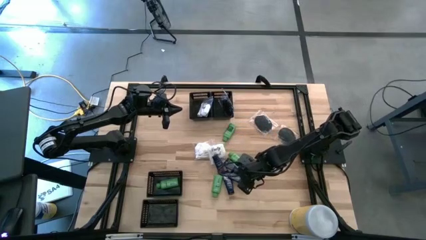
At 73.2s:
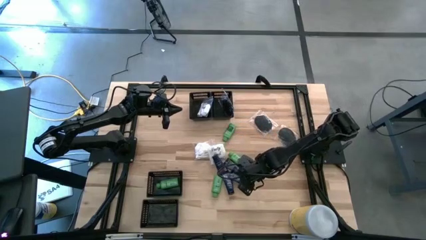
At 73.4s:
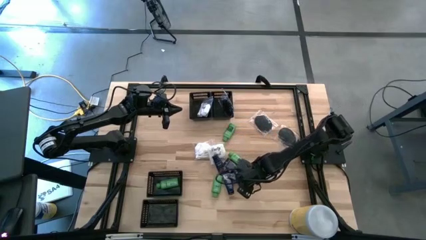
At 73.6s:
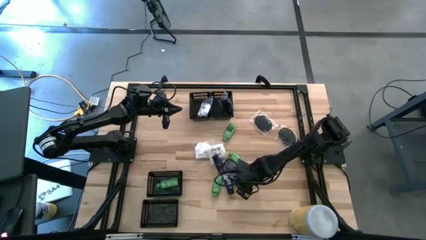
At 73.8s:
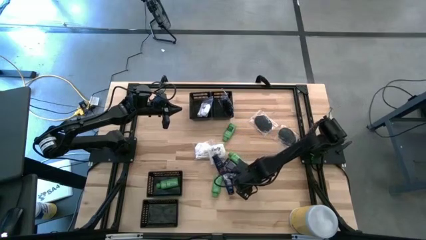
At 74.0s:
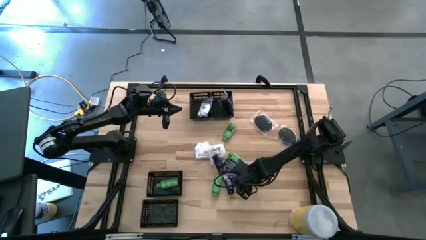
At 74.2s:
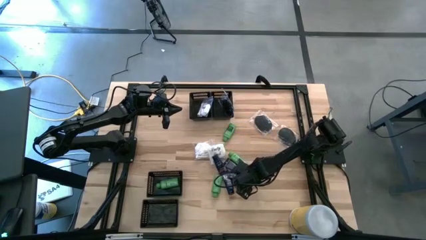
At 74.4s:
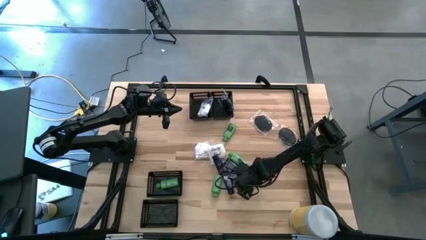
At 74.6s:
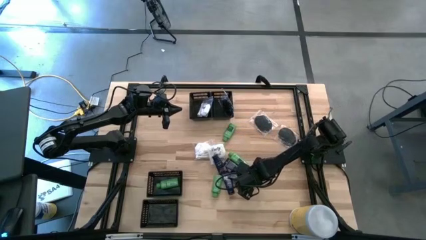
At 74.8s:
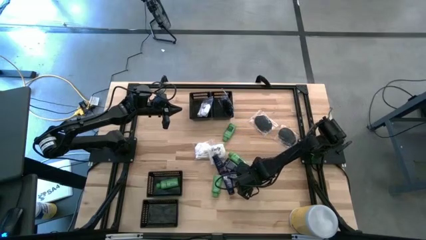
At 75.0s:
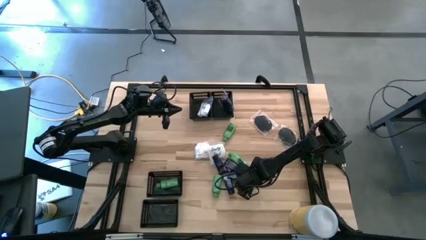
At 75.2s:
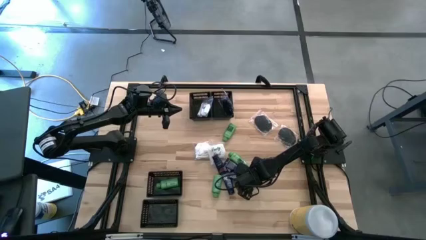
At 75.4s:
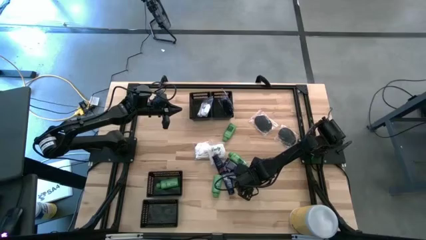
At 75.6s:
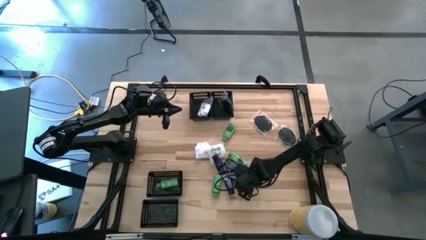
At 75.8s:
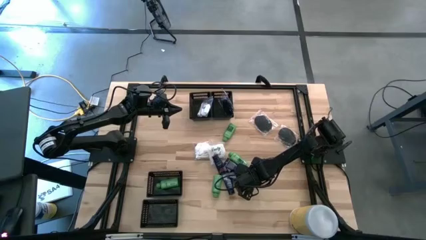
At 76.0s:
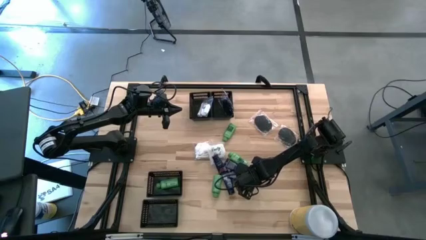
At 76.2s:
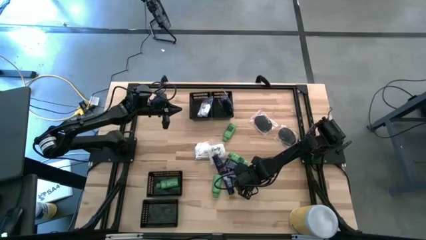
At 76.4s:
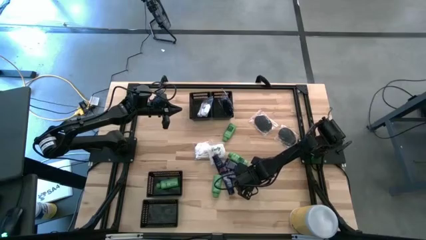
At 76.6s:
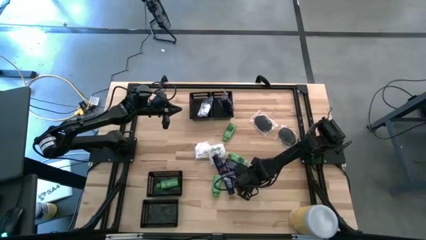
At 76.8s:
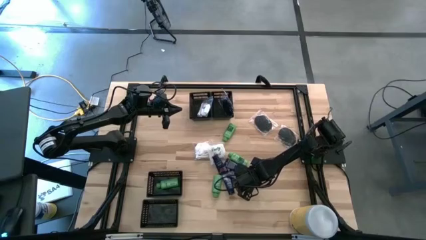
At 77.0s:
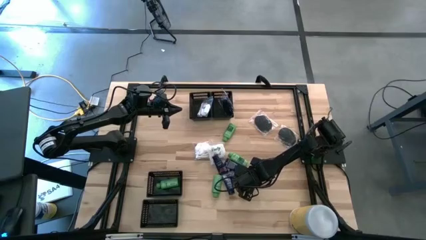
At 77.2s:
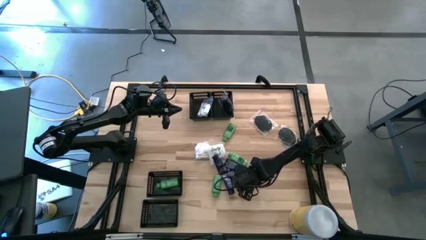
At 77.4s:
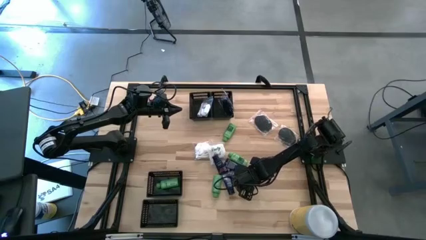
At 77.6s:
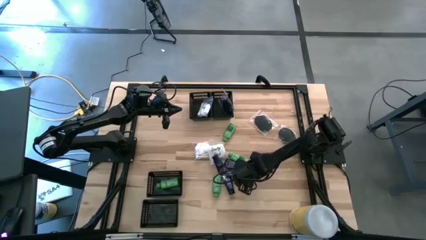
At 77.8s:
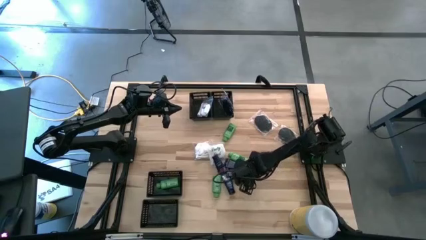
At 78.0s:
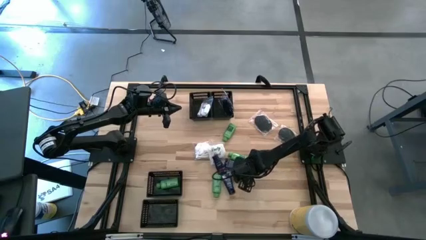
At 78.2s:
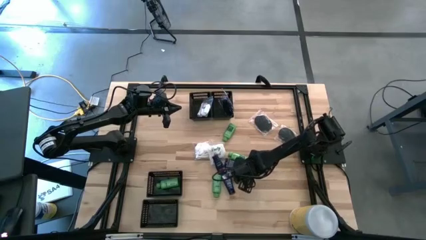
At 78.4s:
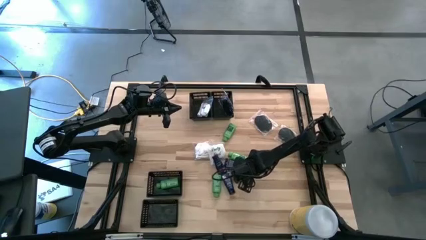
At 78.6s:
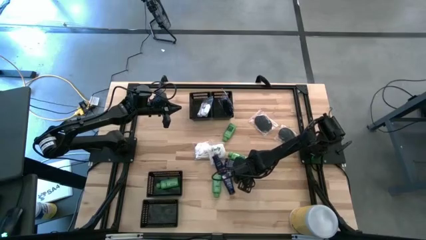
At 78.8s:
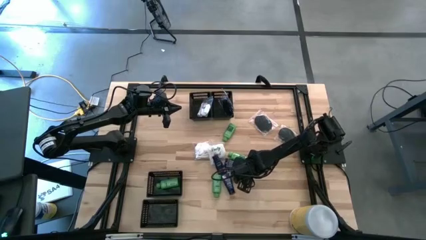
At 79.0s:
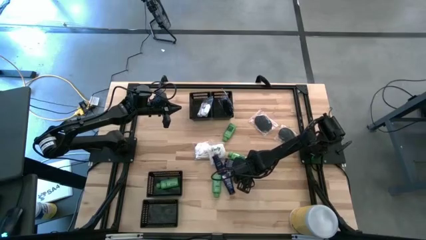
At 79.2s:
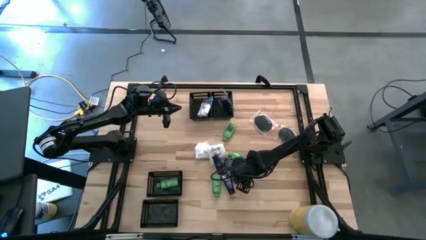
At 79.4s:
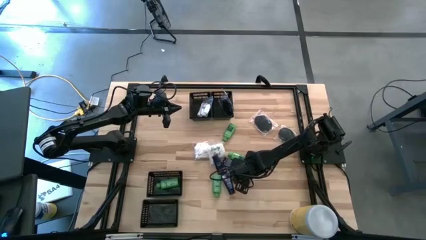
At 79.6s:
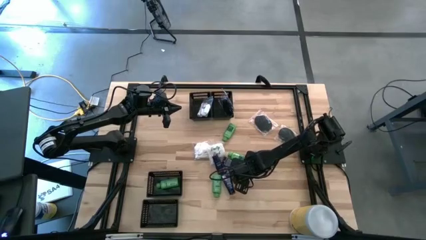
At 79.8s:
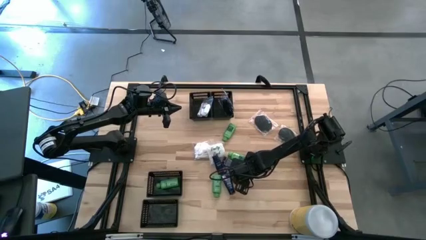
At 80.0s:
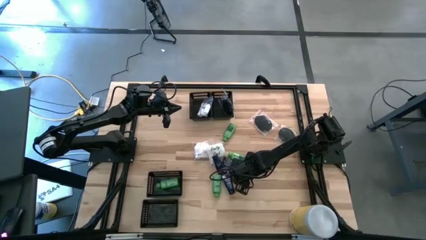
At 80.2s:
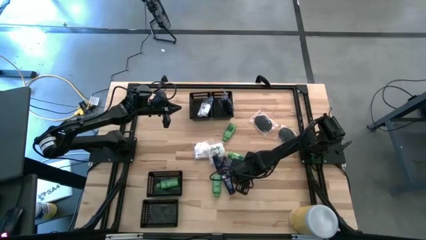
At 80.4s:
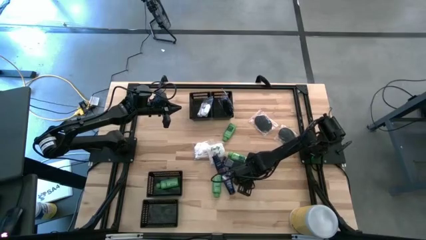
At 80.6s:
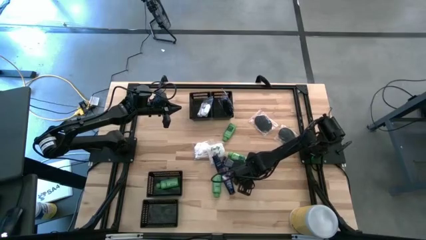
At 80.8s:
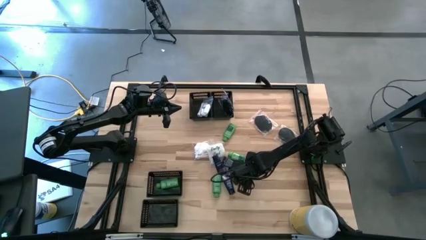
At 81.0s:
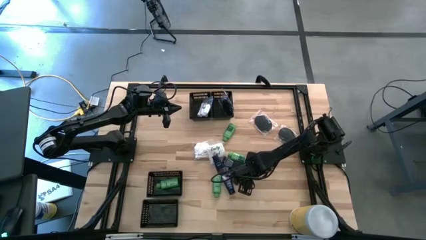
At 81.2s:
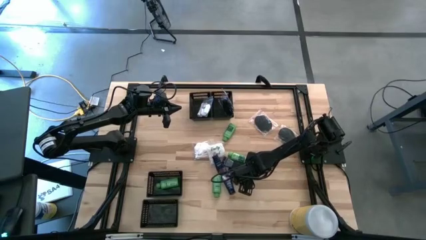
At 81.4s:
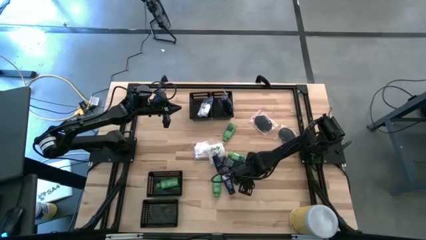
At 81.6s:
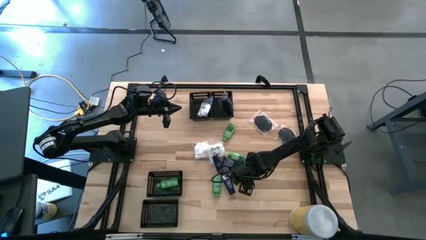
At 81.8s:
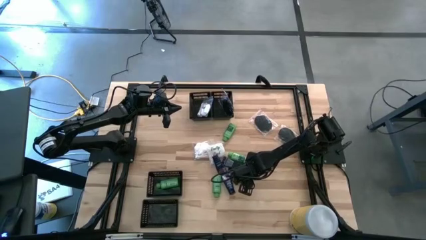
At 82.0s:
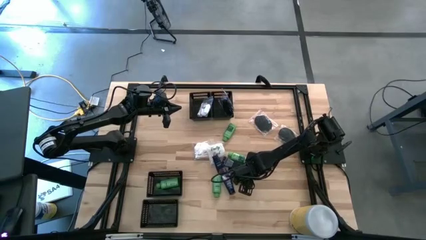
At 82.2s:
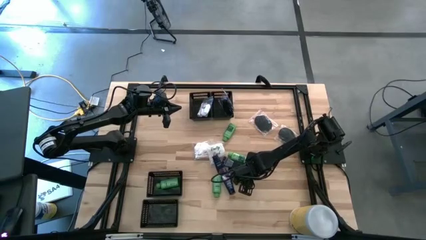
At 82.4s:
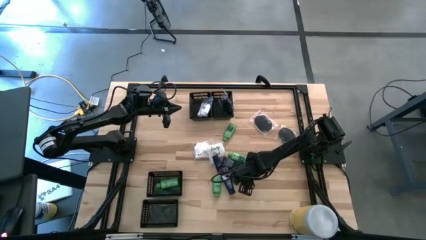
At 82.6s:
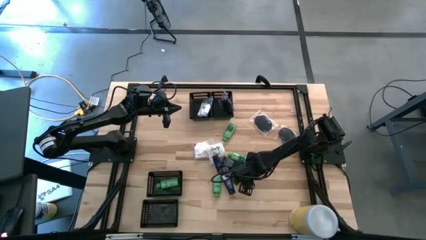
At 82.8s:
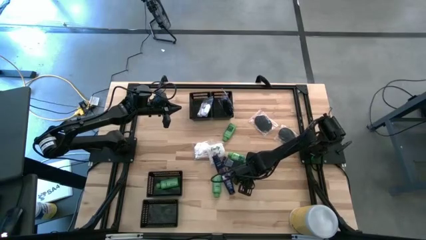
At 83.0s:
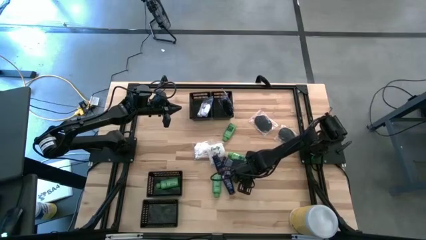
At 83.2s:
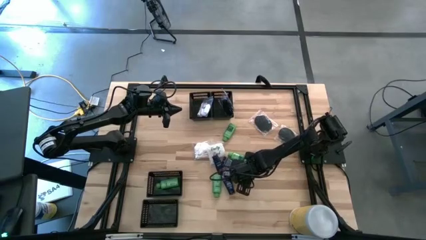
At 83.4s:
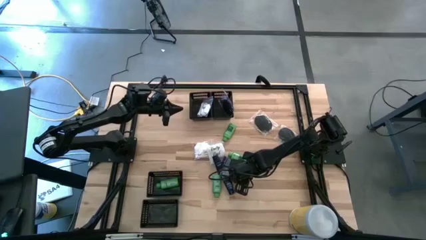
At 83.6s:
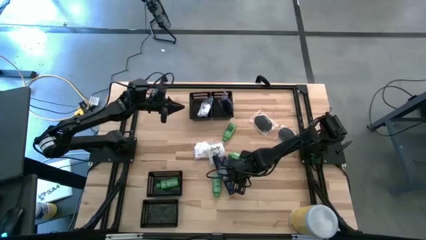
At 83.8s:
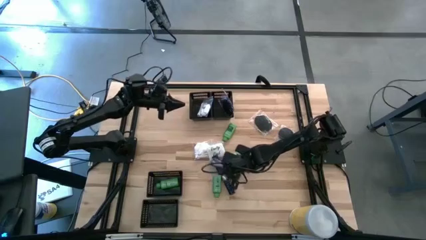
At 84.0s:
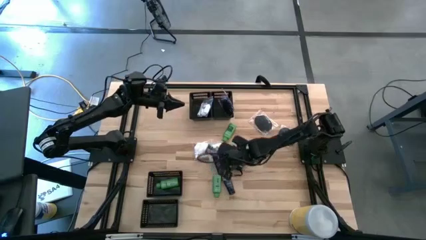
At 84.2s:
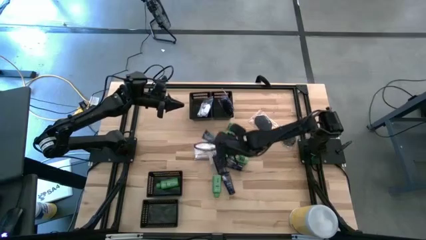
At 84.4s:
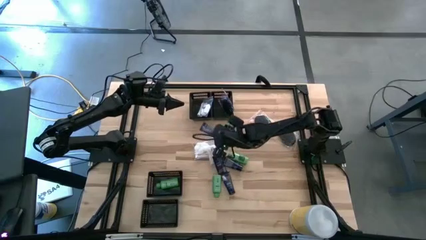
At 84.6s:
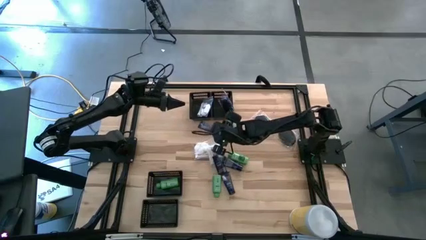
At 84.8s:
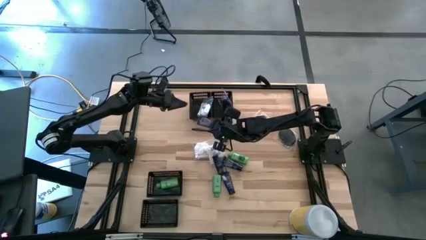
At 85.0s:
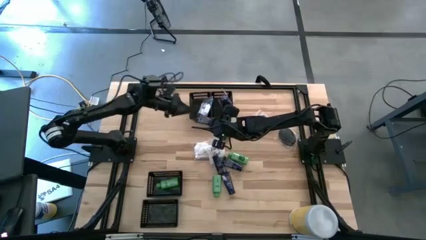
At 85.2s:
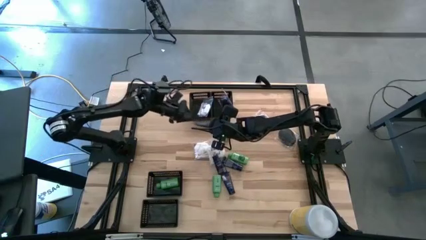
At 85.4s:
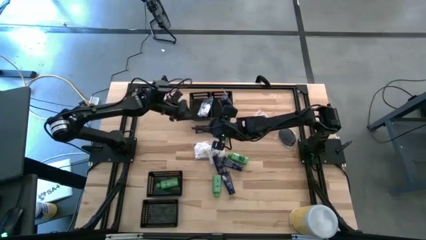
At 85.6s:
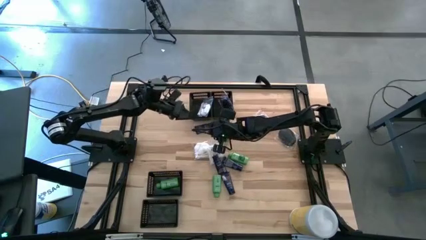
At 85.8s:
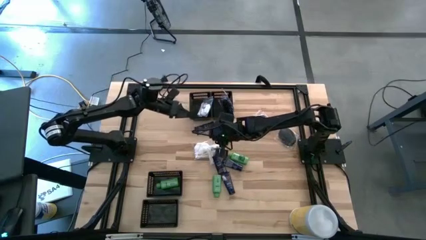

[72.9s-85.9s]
Task: Pick & Place Travel size toiletries
Put the dark blue shave cream into the bottom left basket

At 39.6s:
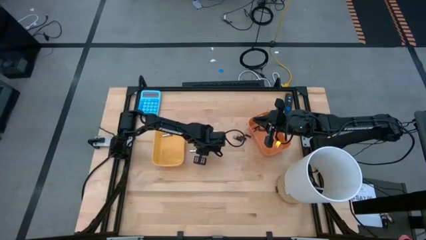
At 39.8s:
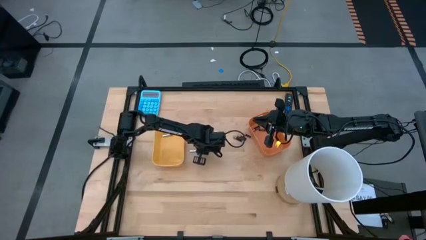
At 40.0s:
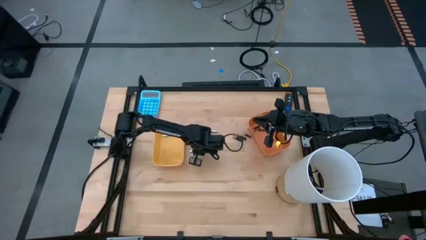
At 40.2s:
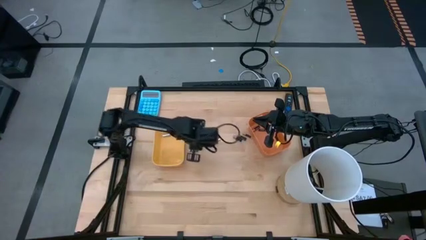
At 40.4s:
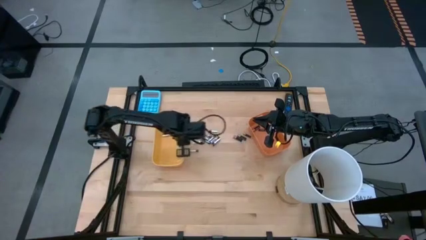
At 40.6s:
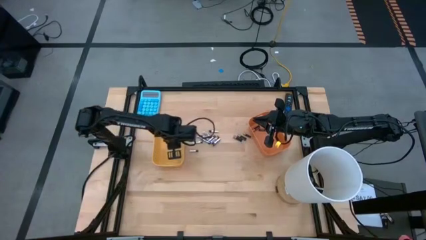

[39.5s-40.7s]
Task: Sort batteries
Put the silver battery into the yellow bin

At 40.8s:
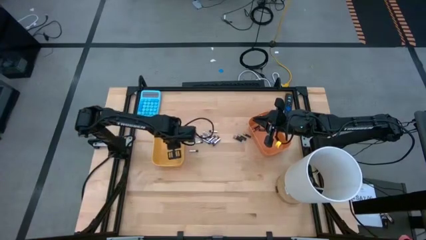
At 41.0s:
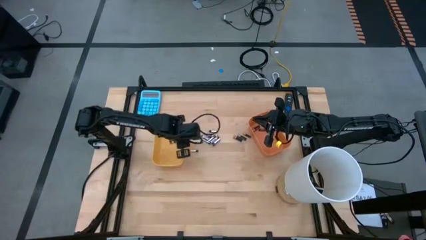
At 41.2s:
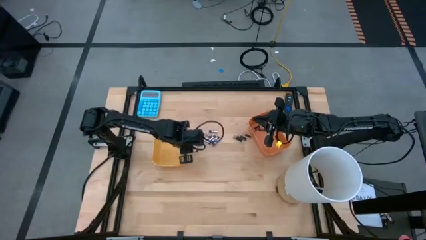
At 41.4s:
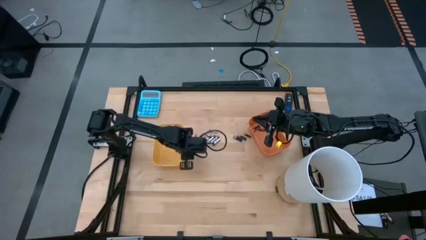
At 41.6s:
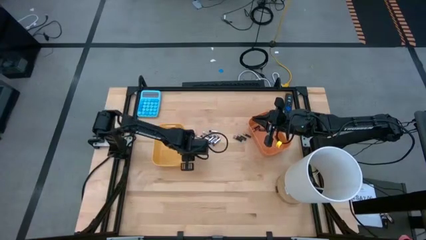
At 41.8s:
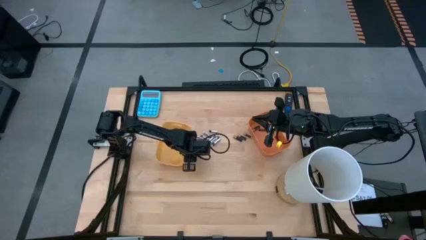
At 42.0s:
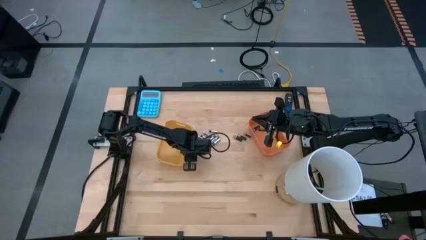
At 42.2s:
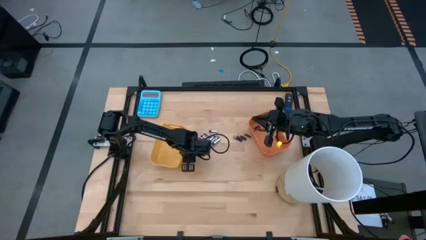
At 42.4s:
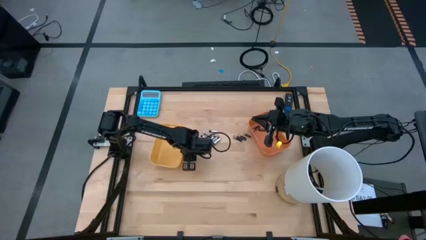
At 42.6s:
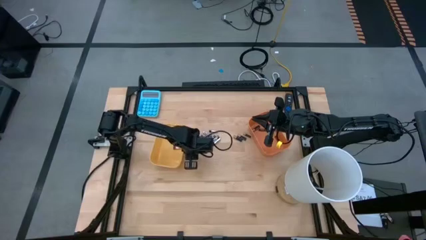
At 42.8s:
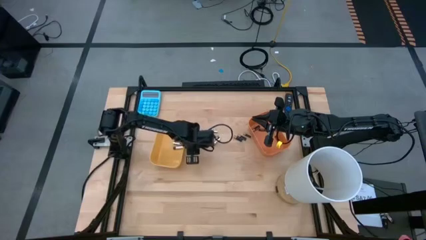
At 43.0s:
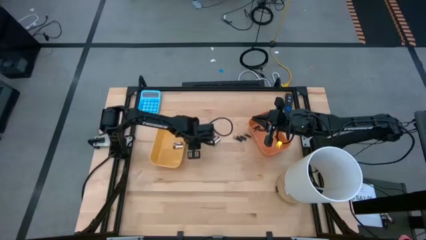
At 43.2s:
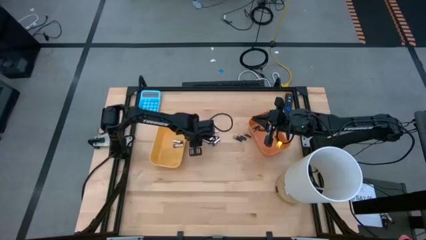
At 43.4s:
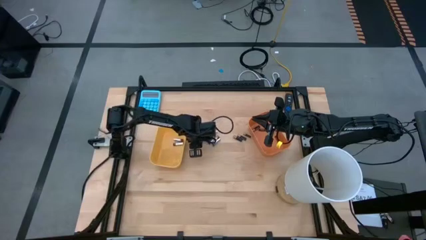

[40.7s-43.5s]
Put the silver battery into the yellow bin

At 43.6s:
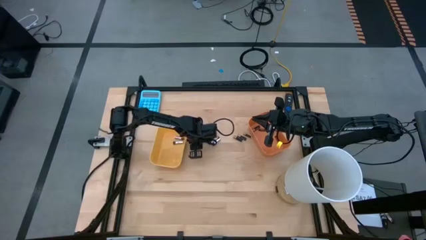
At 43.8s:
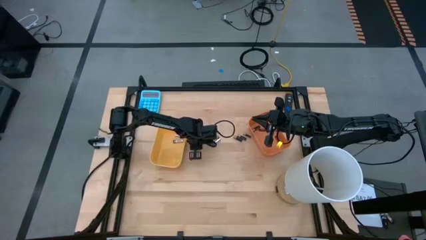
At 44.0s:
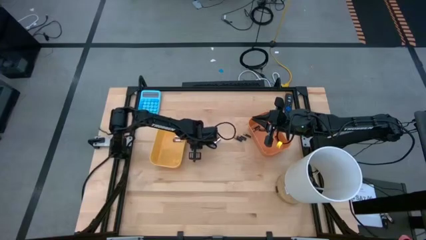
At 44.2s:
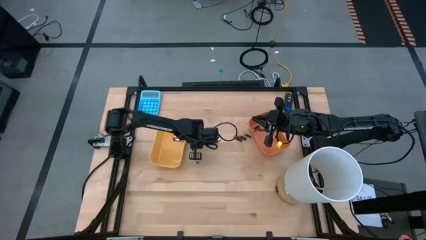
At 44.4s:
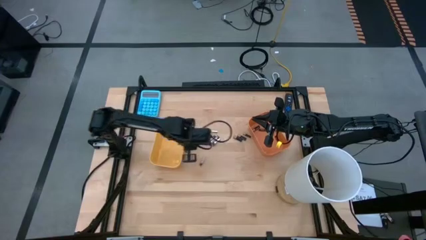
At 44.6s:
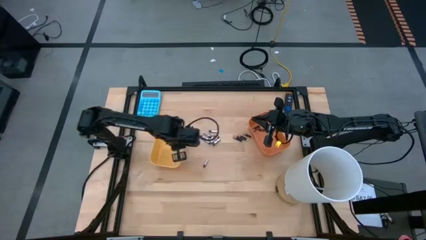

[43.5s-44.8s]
Put the silver battery into the yellow bin
